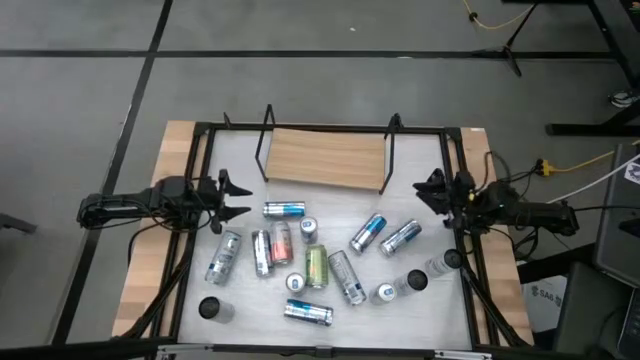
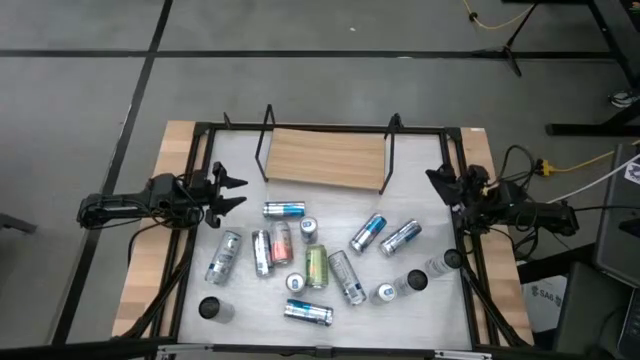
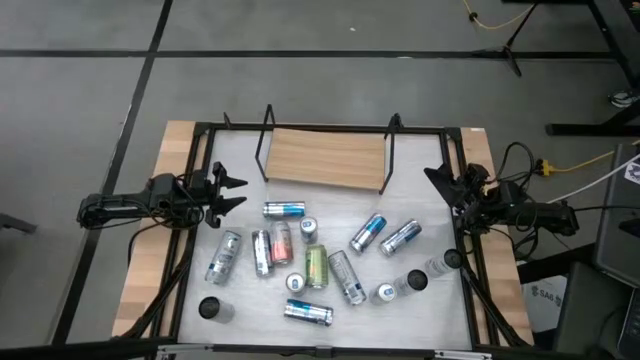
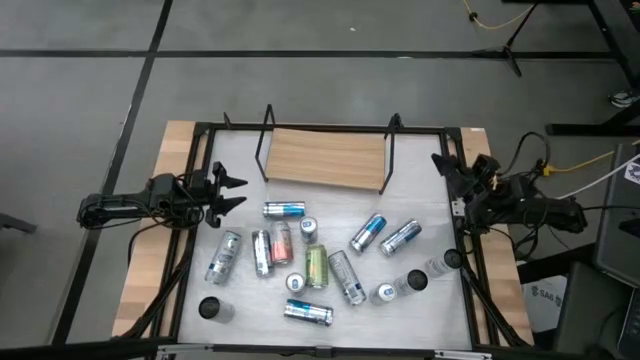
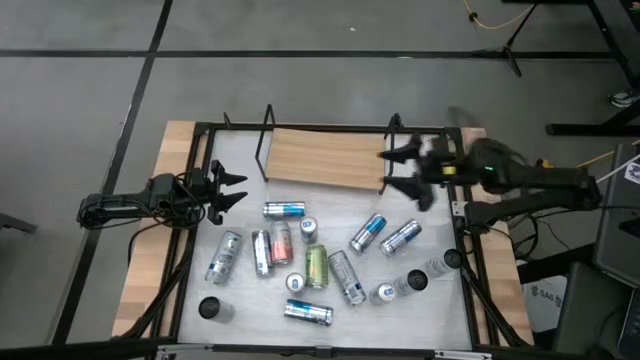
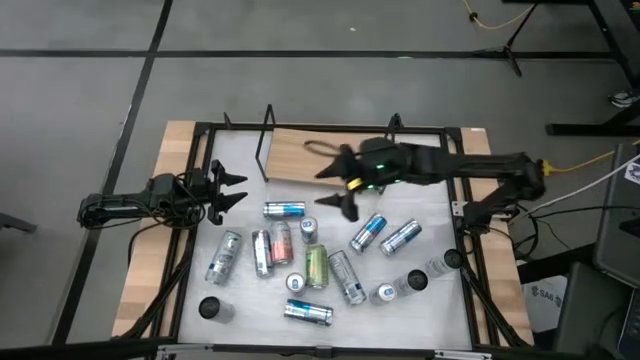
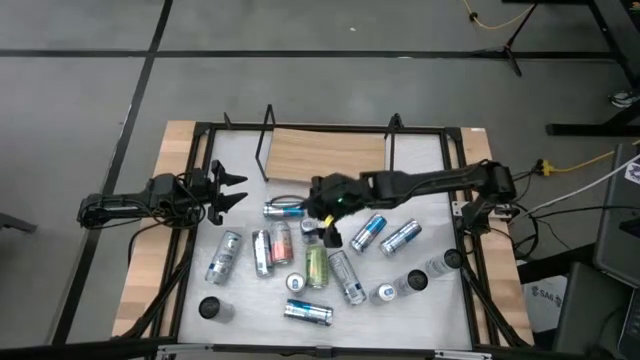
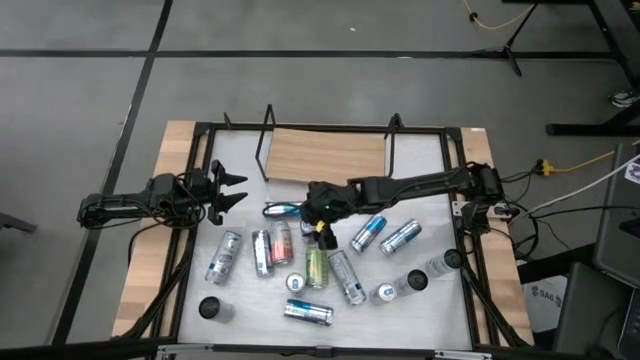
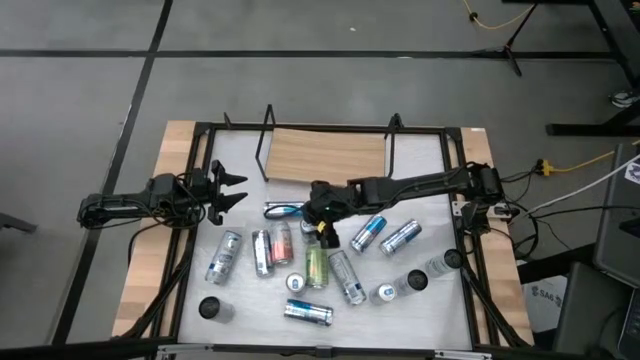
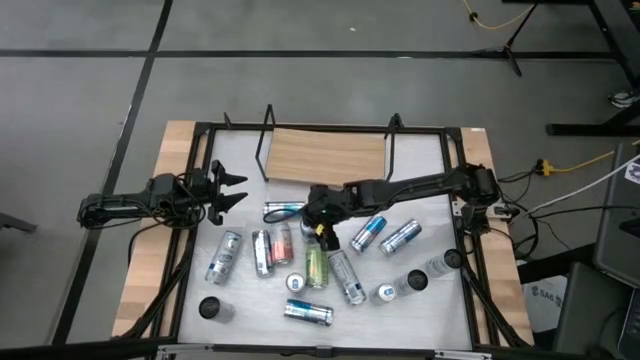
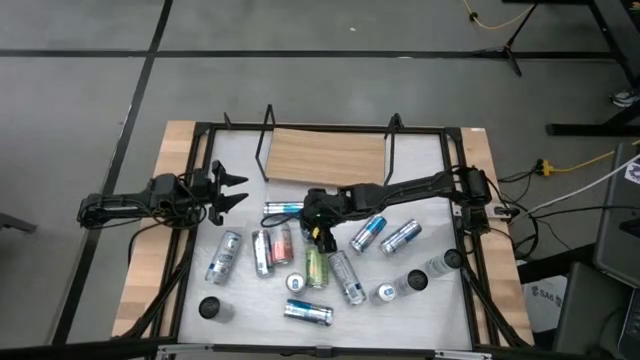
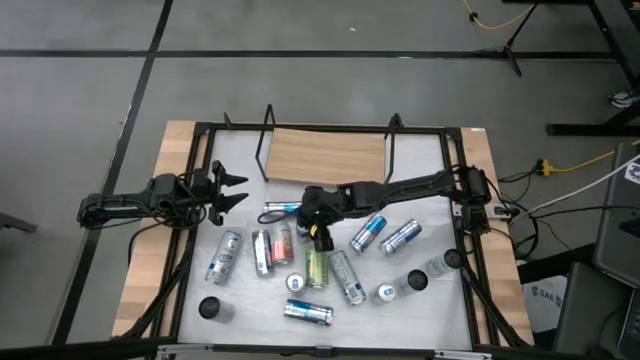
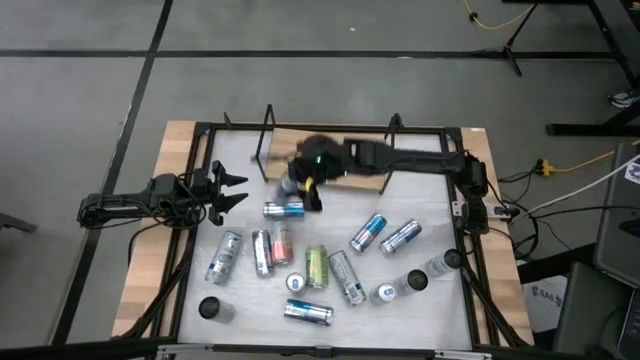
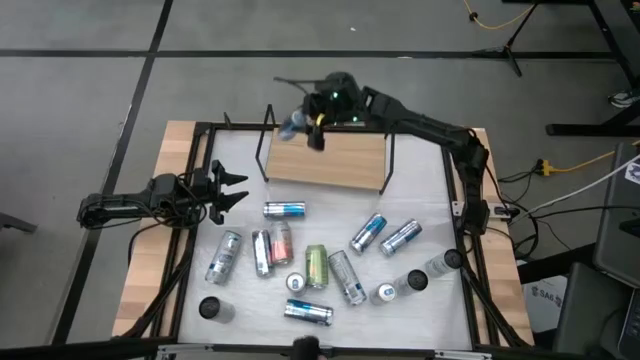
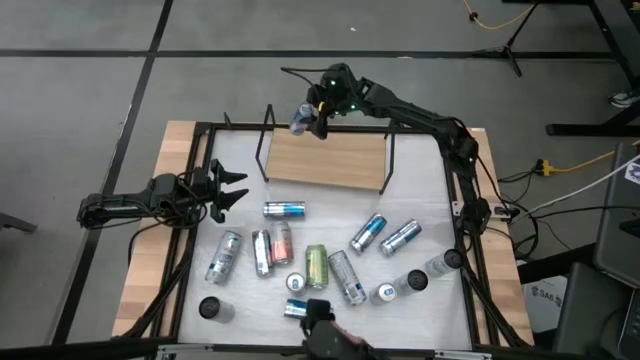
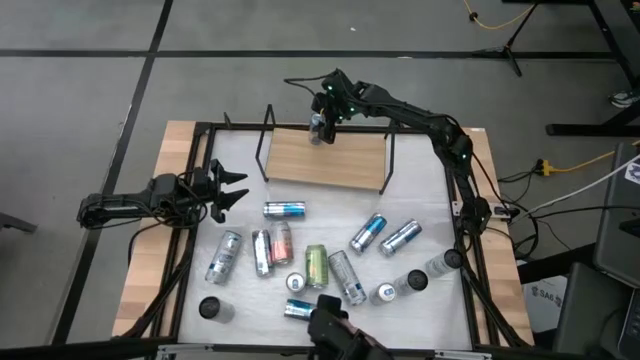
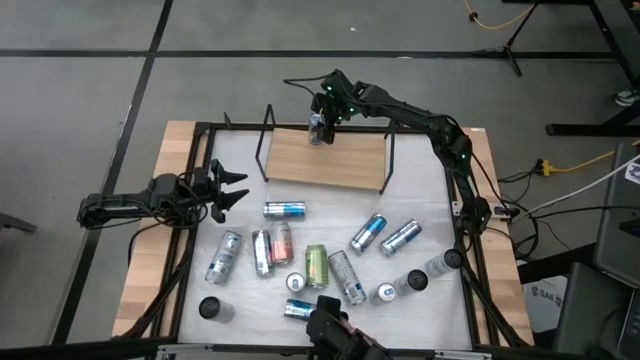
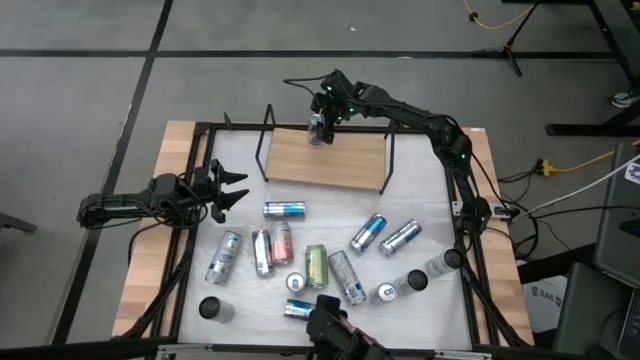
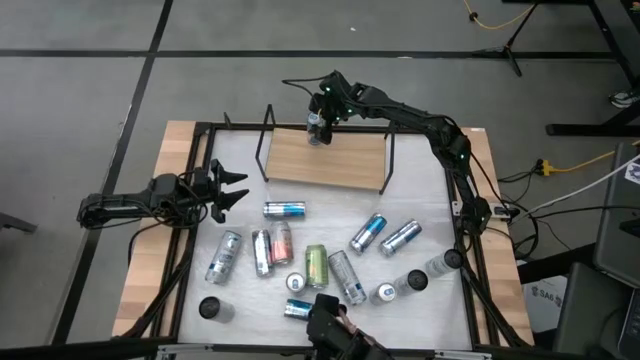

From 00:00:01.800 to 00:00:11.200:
Task: Place canned beverage on shelf
Put the blue soda can on the shelf

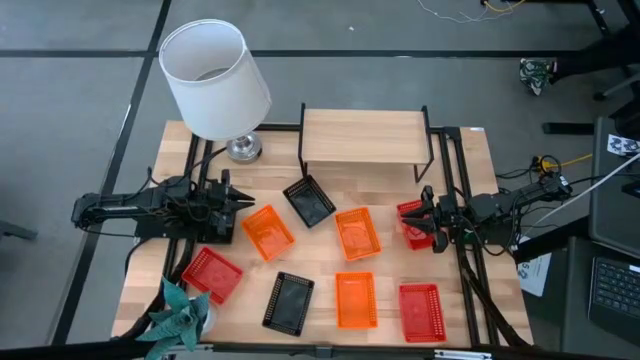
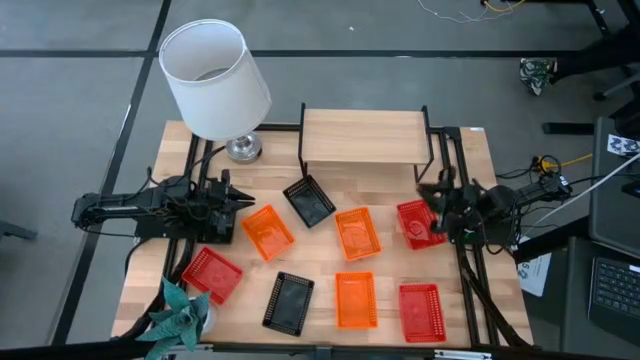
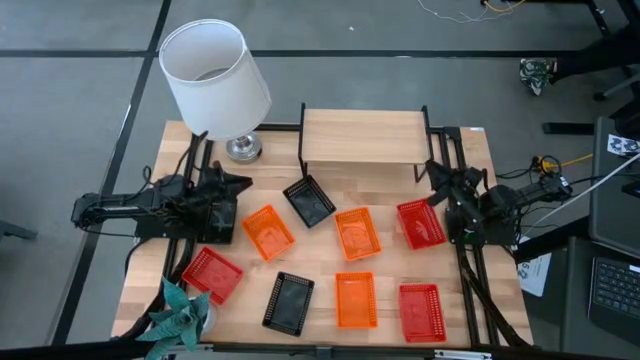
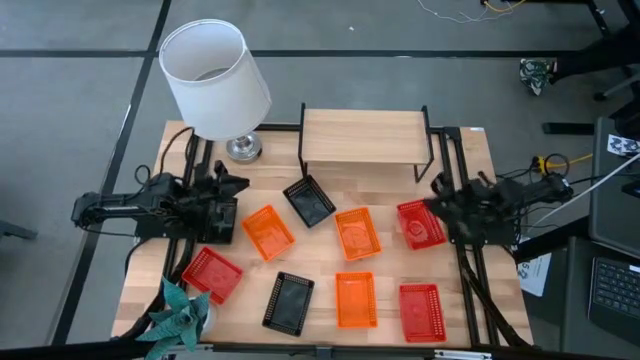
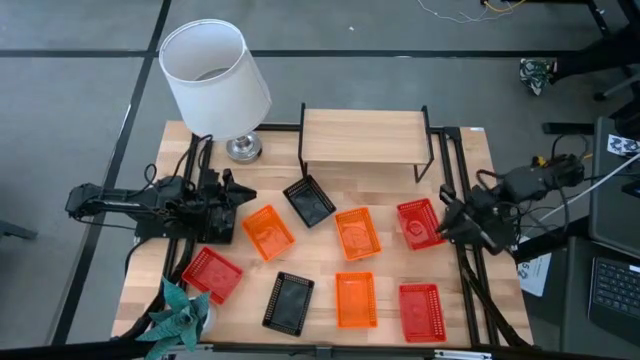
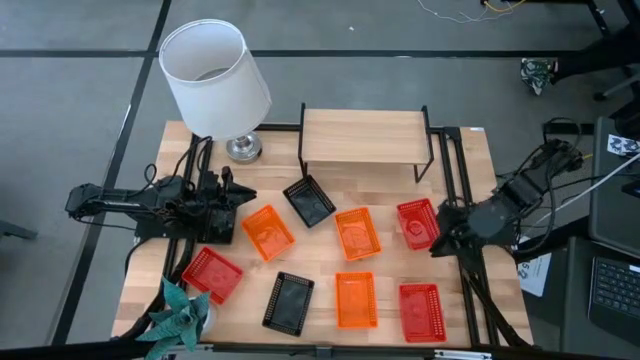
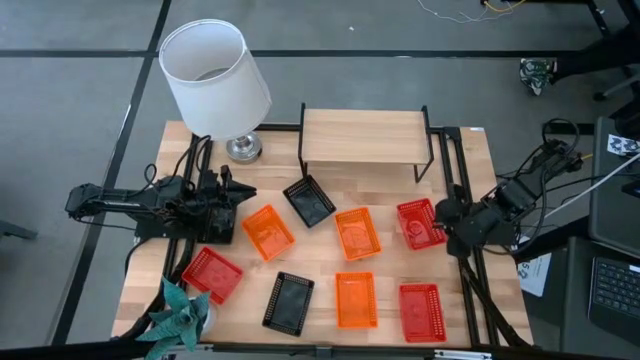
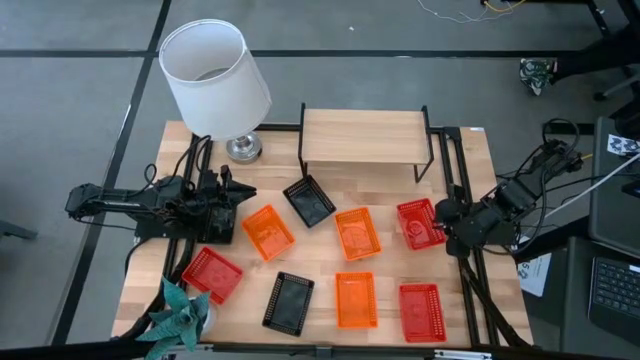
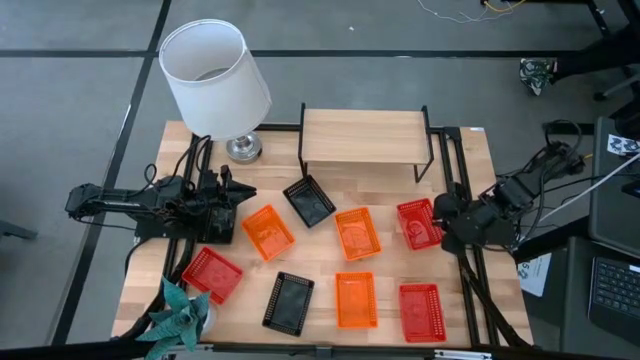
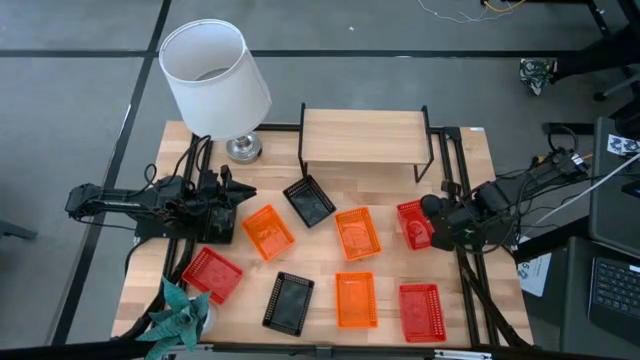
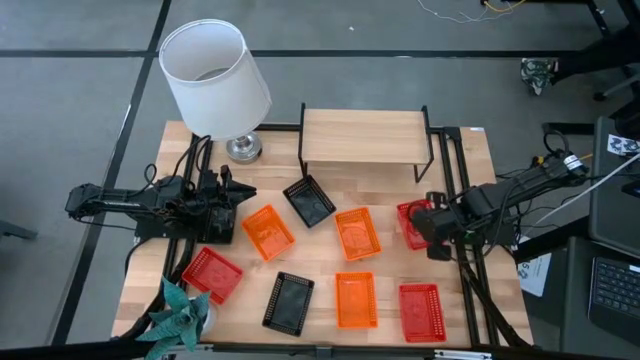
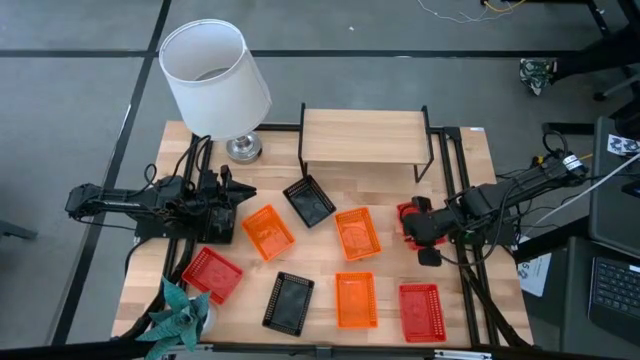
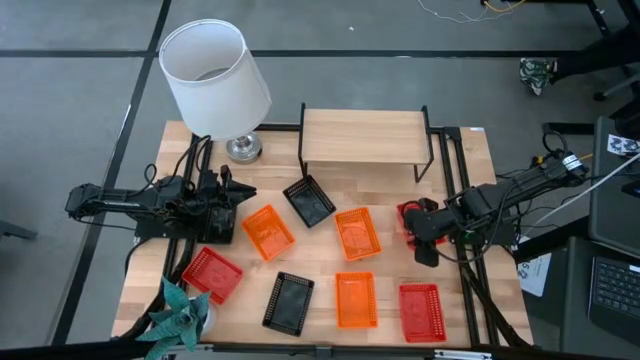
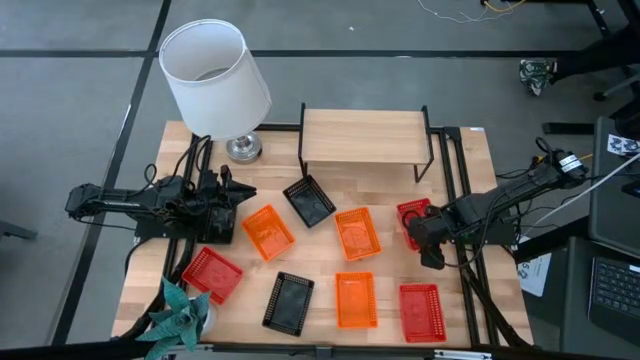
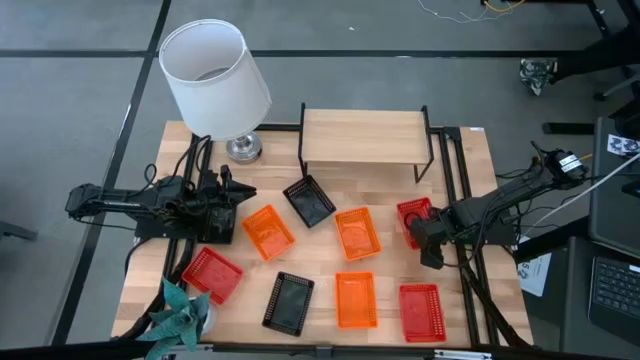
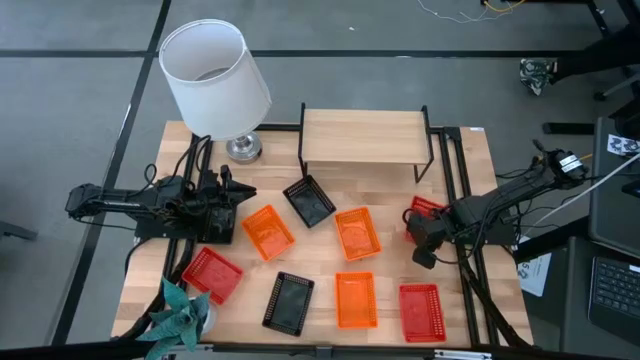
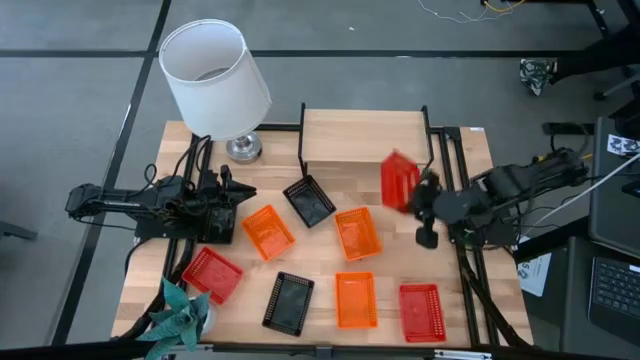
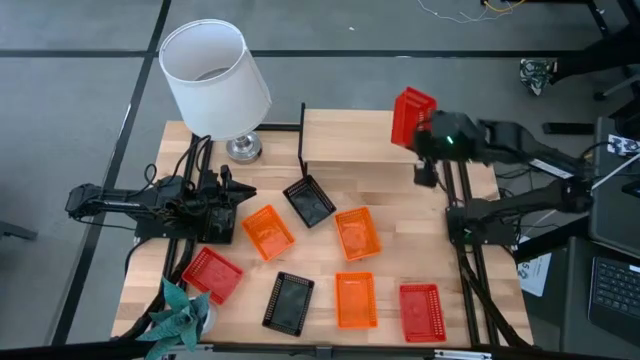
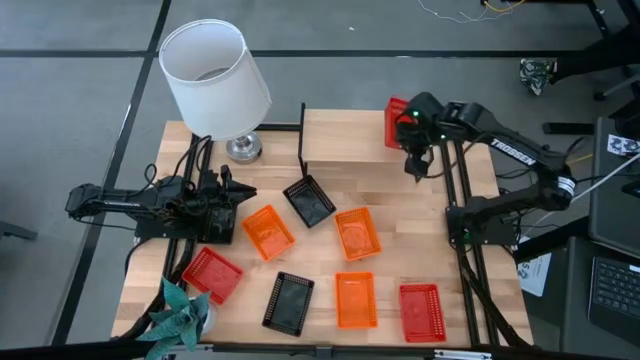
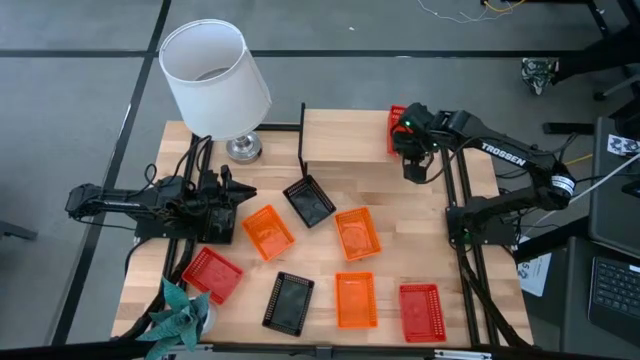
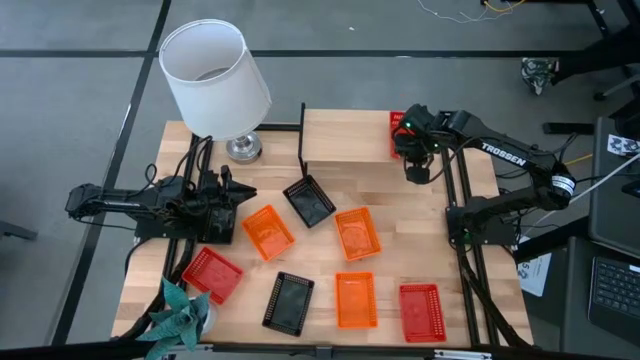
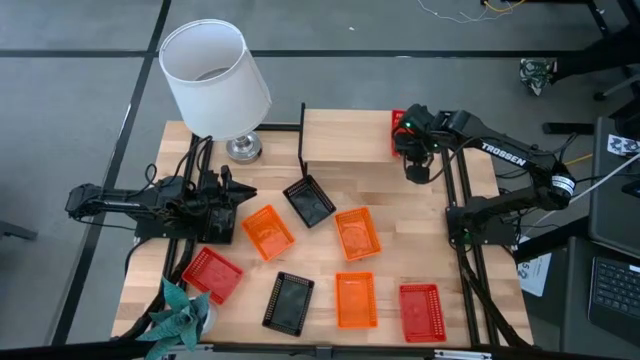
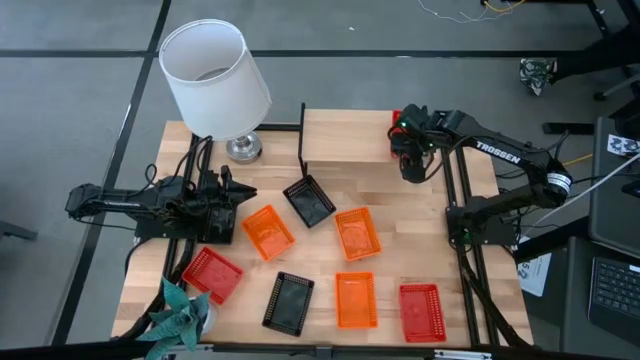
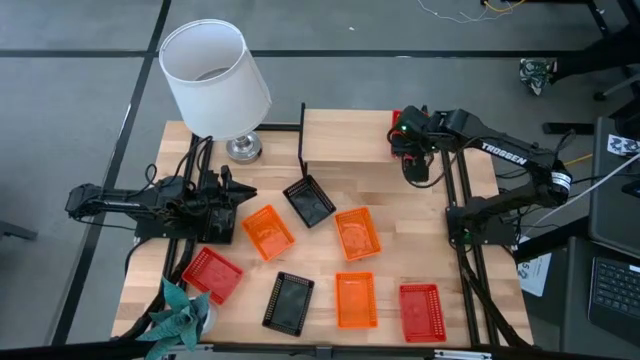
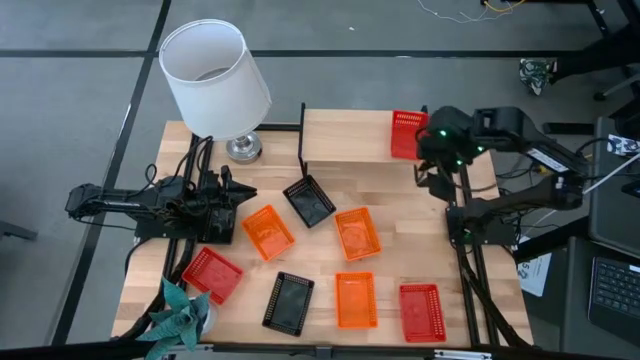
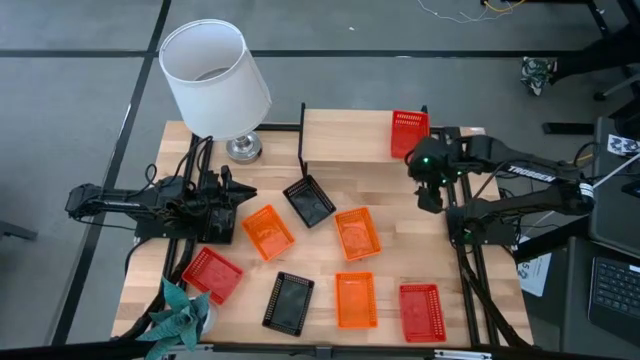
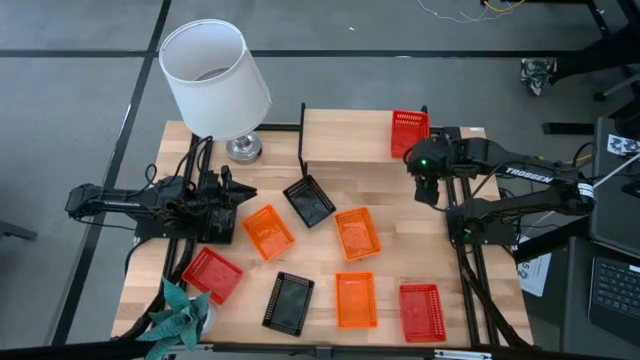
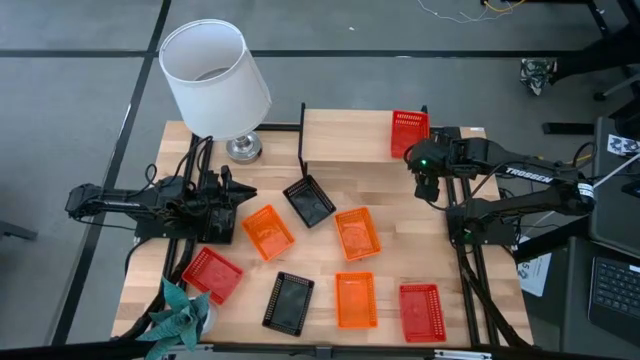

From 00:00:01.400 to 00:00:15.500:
Task: Stack baskets on shelf by color
Put the top red bin on the shelf
